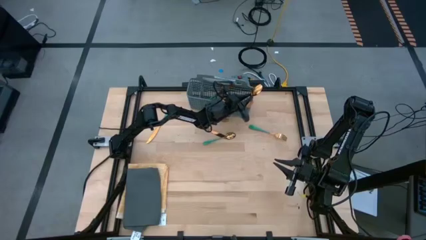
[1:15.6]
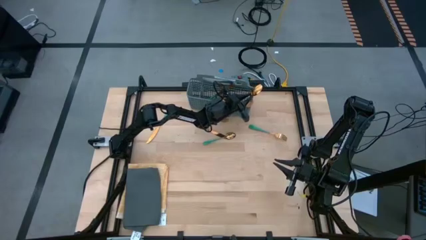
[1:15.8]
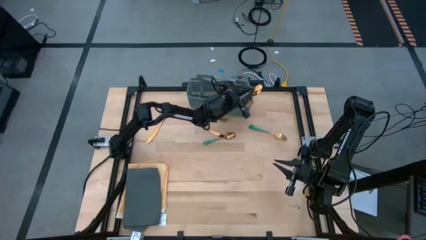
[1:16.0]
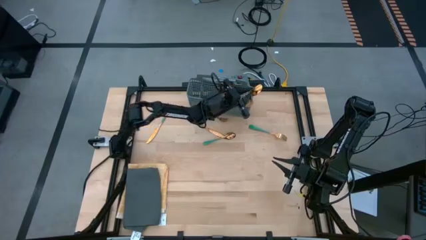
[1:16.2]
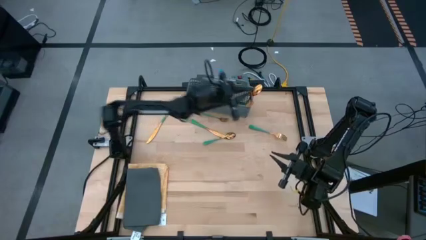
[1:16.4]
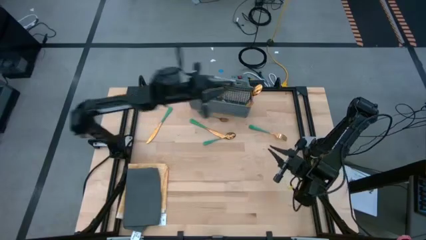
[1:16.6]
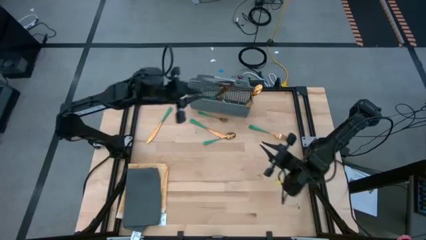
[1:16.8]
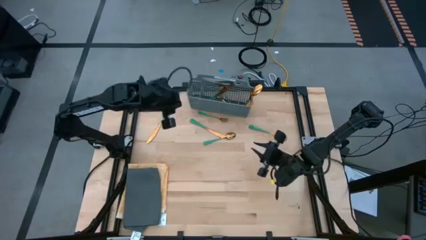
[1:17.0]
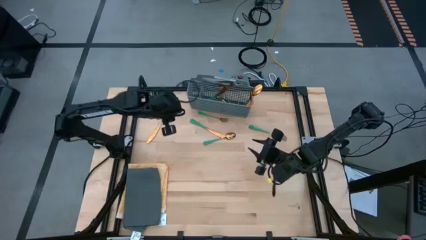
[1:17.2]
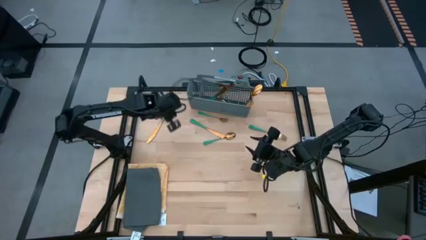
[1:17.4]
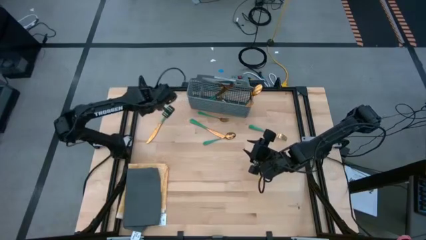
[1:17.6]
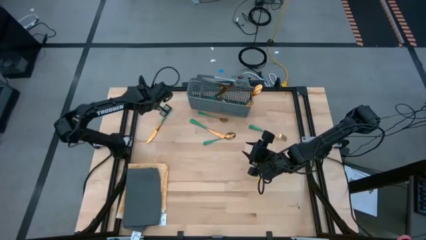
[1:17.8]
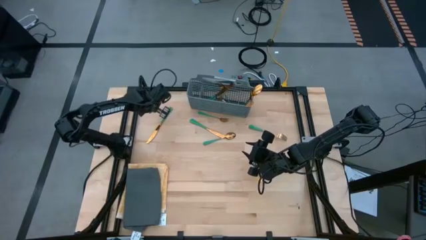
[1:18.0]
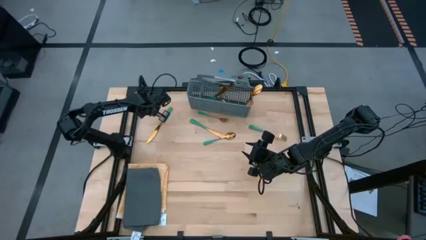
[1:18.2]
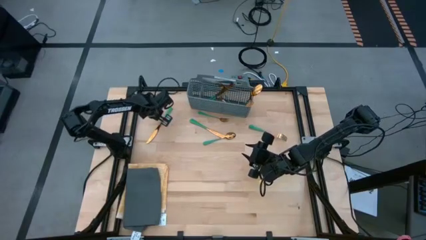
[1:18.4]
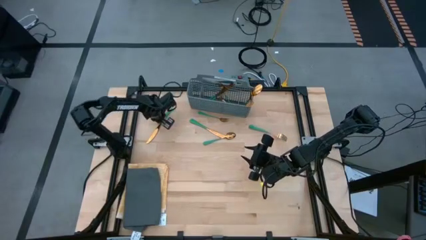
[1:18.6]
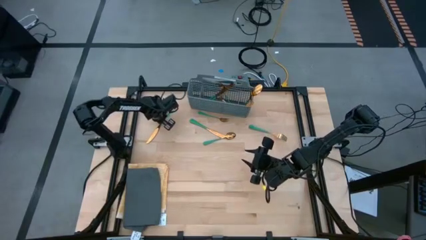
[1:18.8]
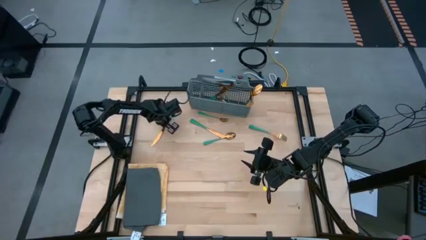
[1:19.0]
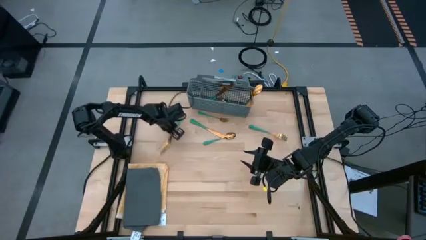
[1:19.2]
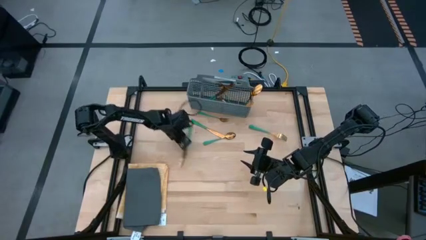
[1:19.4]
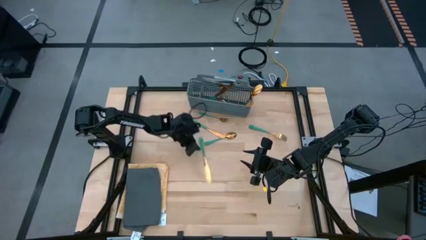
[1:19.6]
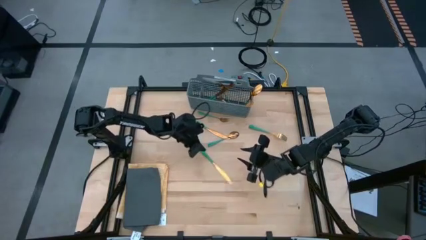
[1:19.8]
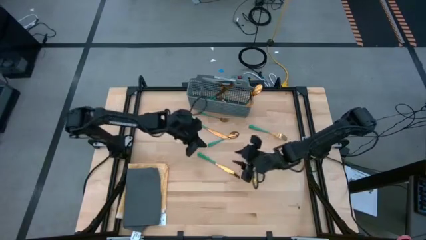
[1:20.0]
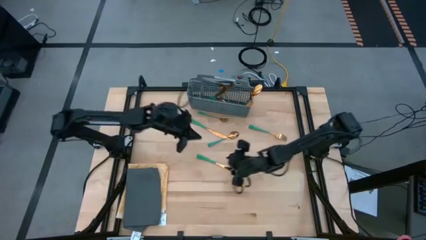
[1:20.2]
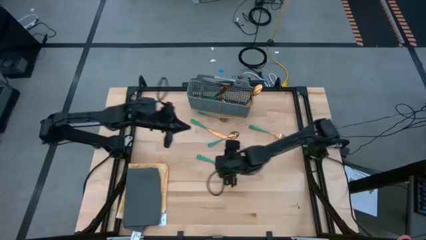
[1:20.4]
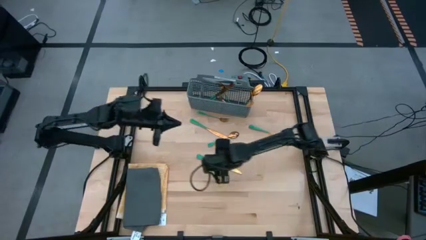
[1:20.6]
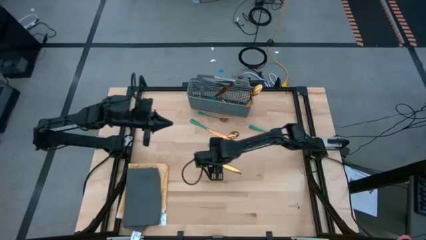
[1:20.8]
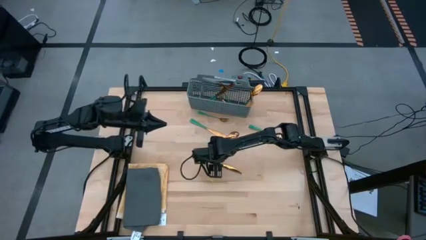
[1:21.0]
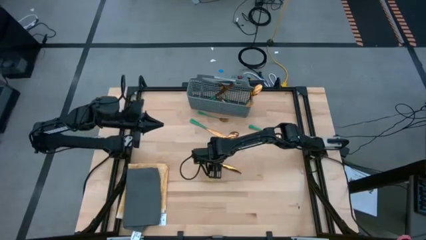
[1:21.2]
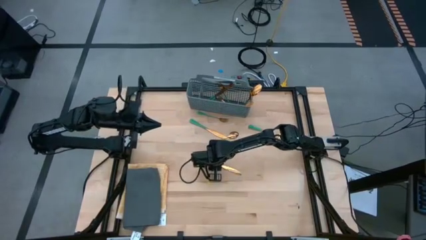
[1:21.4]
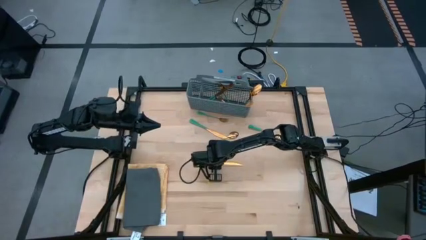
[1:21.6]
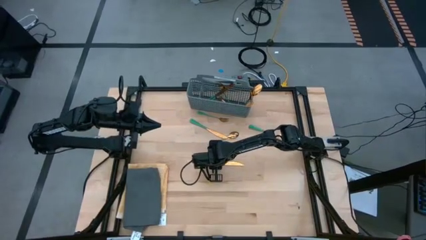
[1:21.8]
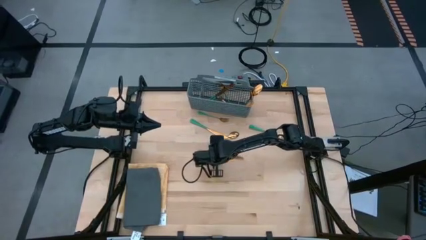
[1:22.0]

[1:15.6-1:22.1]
Task: Sort silverware
Put the green knife into the dishwasher utensil holder

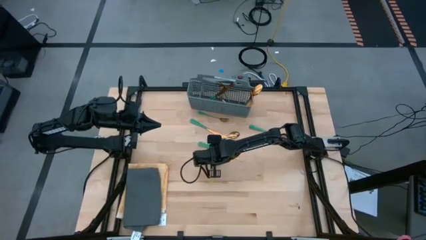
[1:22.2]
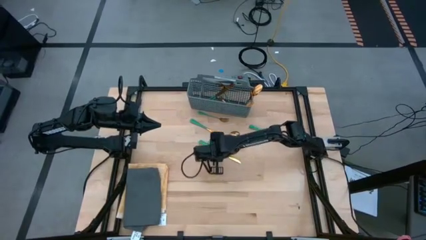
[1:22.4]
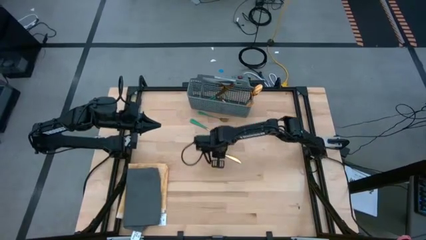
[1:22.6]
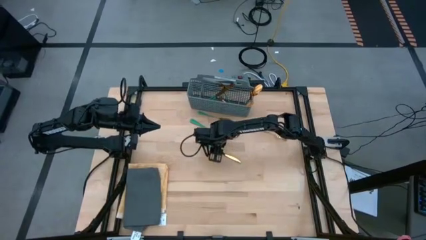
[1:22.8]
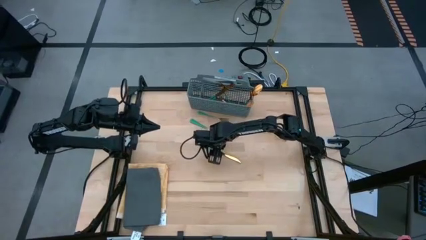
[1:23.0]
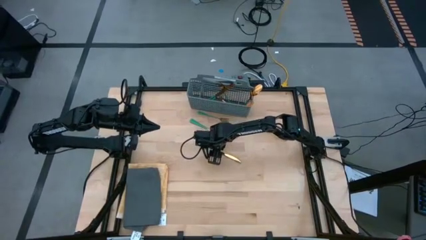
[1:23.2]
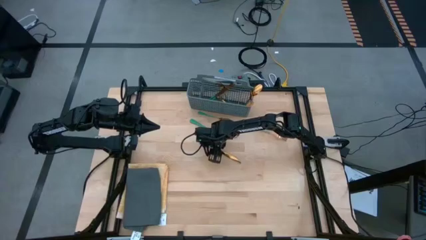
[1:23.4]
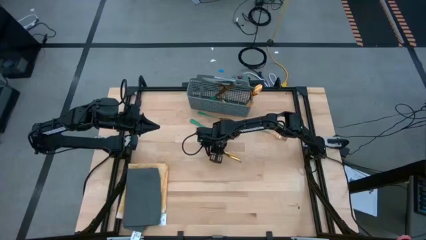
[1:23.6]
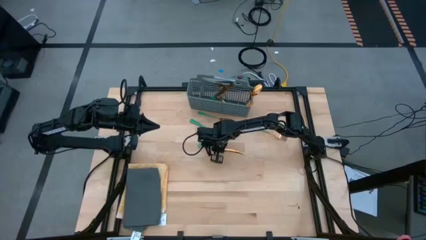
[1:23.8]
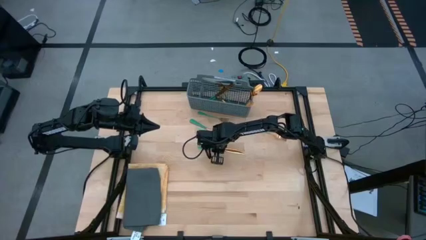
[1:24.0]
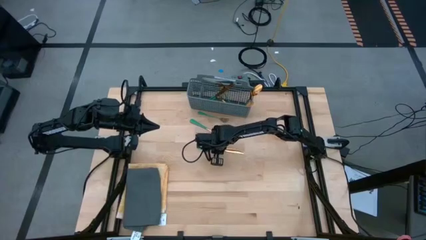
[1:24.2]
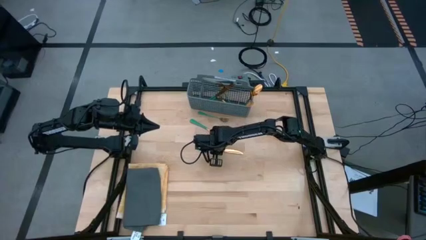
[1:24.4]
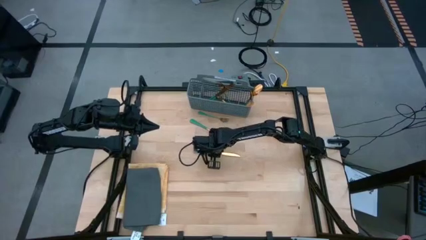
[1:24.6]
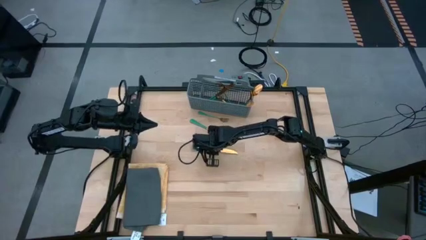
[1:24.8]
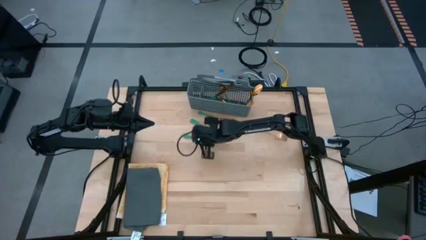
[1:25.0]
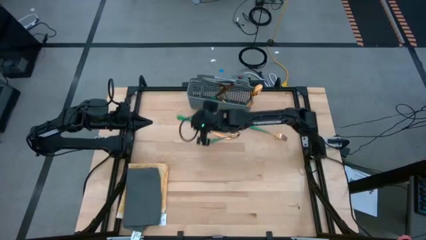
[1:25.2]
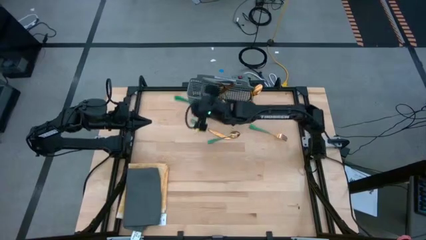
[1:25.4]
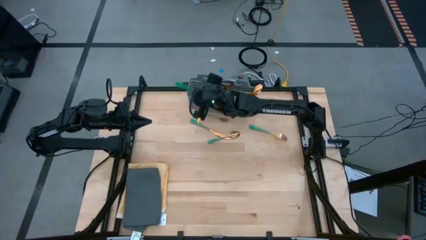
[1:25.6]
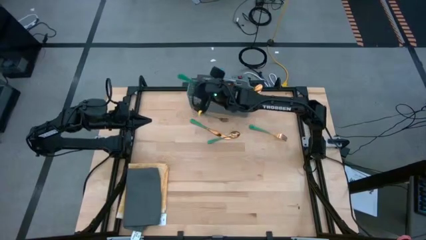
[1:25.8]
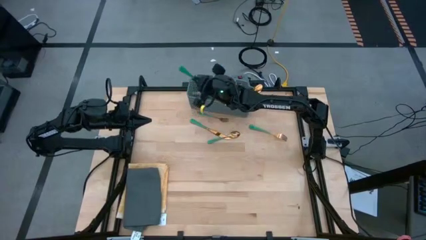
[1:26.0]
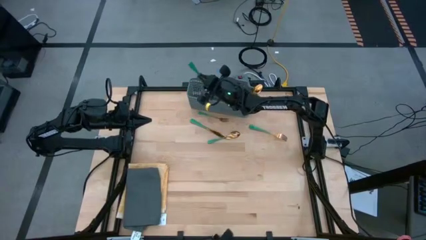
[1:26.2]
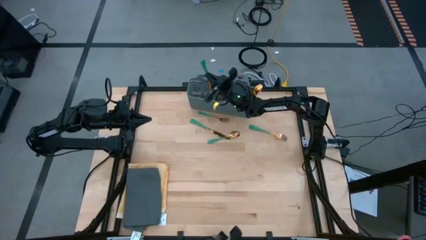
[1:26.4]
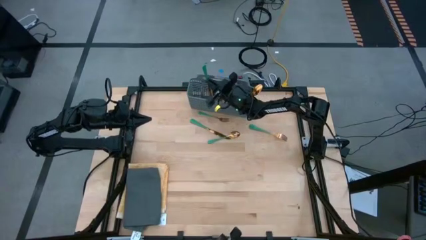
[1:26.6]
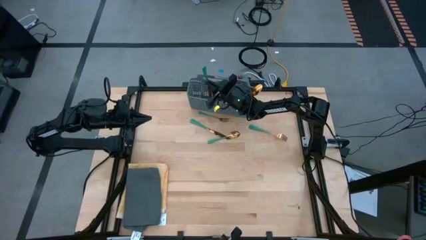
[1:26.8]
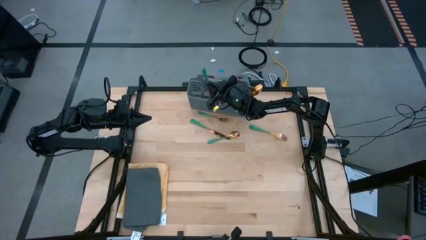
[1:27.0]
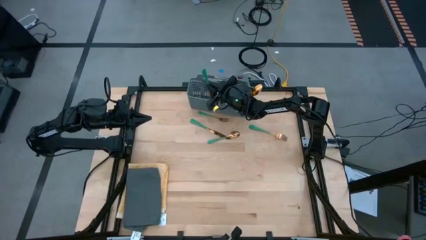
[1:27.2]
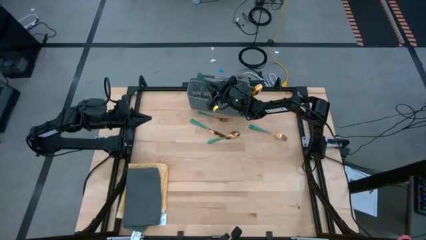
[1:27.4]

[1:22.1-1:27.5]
Put the green knife into the dishwasher utensil holder

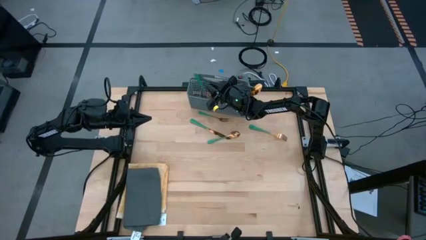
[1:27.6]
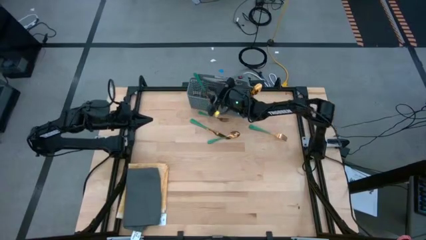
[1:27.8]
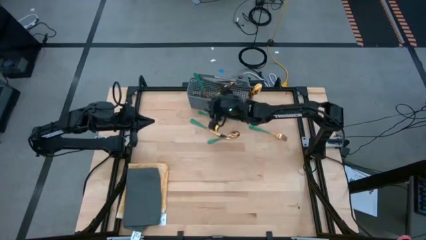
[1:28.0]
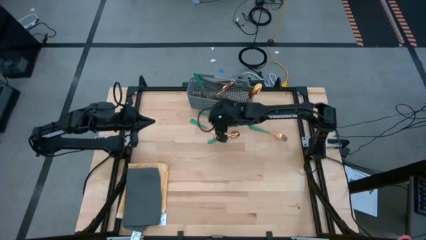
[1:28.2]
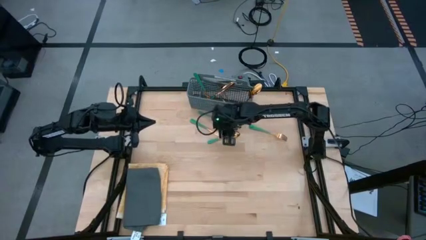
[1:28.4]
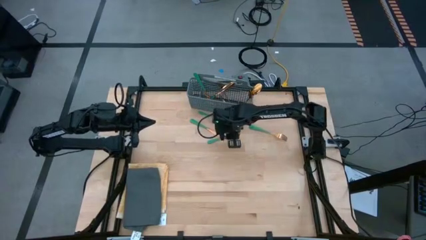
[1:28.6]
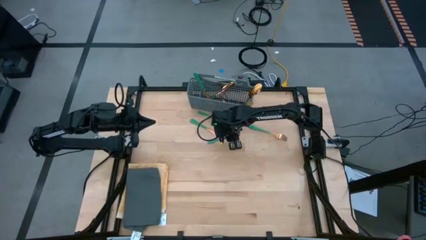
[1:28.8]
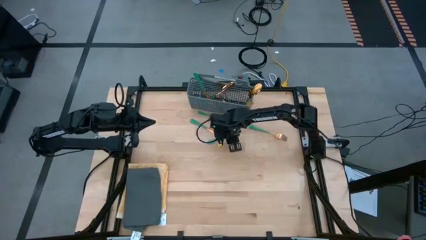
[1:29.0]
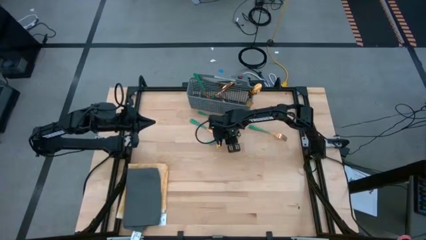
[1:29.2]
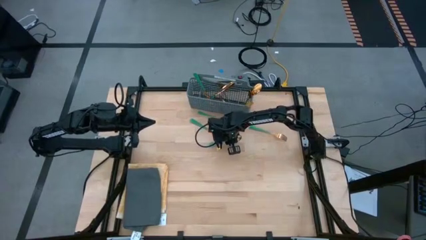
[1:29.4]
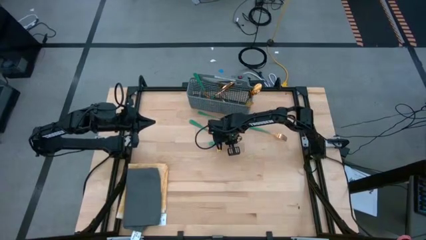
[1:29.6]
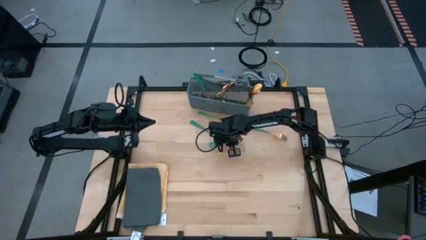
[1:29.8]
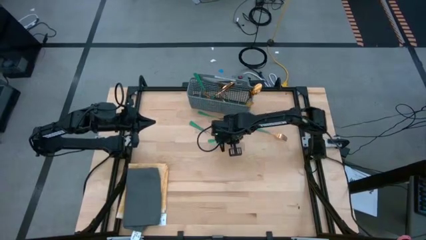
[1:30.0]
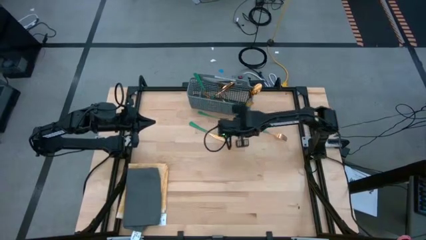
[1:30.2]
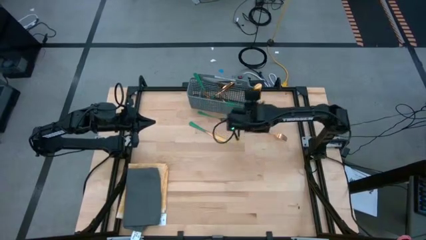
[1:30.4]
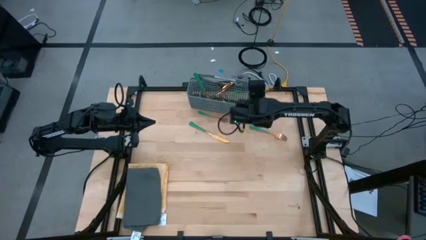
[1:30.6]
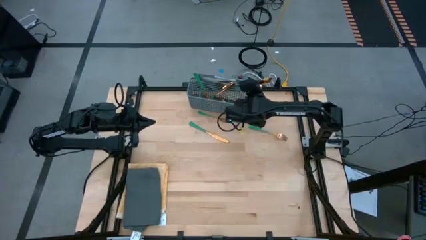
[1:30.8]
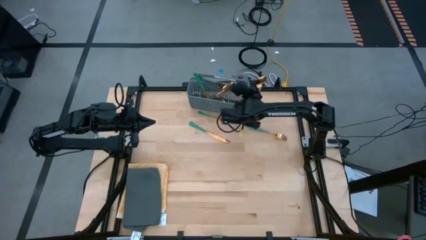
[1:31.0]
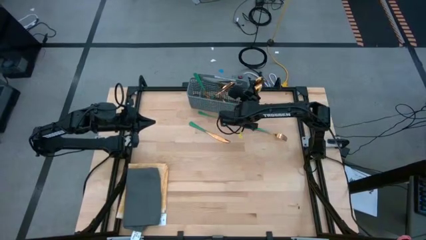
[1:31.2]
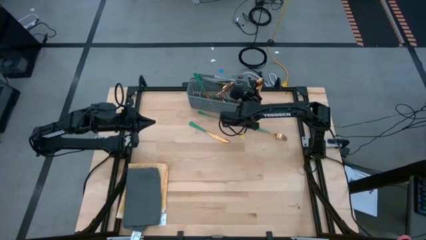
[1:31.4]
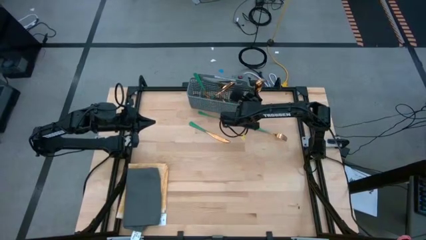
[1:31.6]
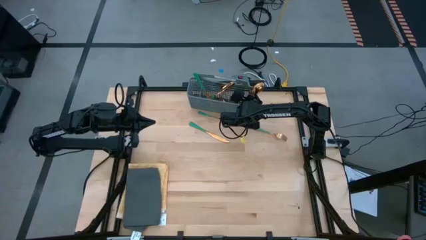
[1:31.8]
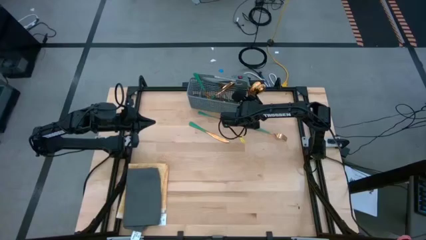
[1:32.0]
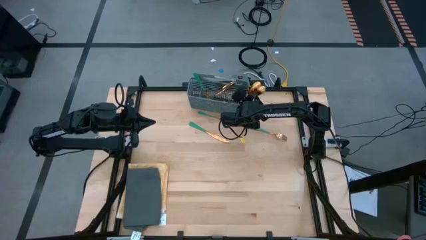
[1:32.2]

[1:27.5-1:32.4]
Put the green spoon into the dishwasher utensil holder

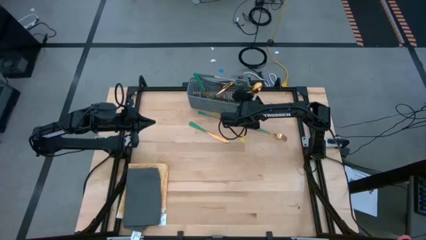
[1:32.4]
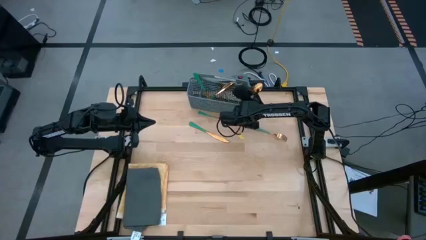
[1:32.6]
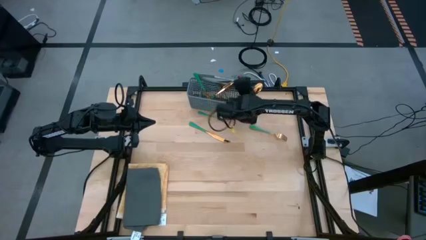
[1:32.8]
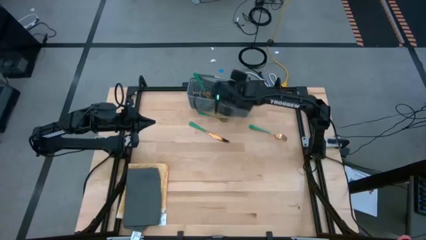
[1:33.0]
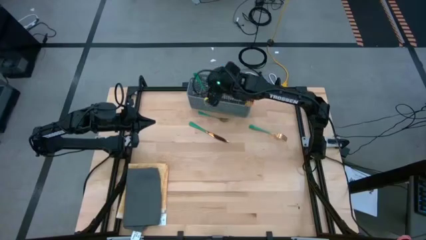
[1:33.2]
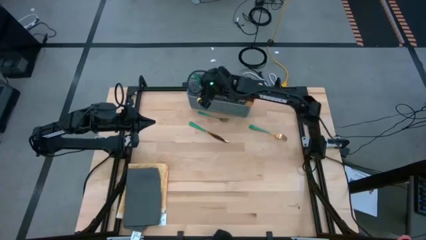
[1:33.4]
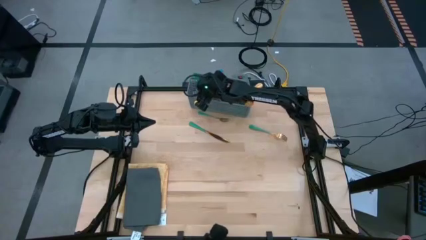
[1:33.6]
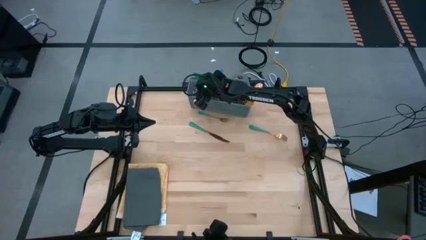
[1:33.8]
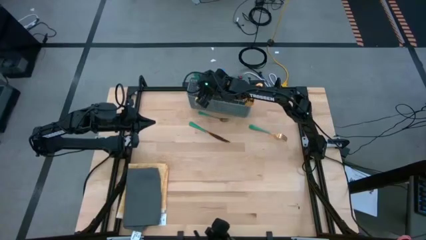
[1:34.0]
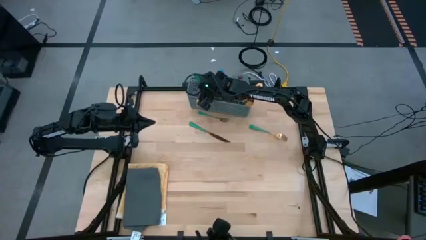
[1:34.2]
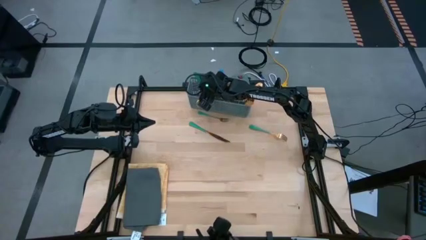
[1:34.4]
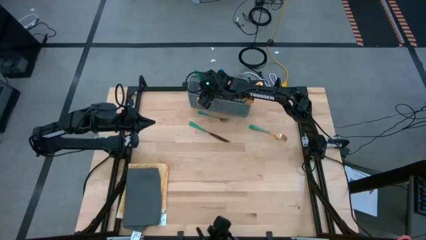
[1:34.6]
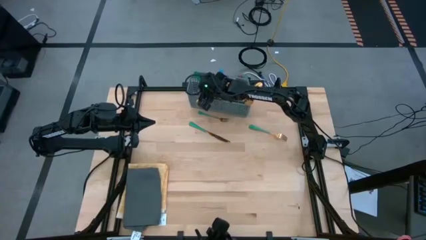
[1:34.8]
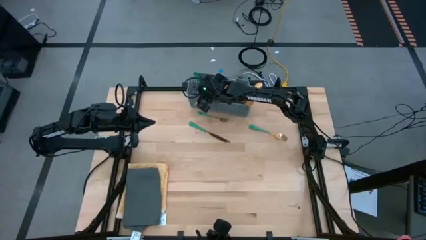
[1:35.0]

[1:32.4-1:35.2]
Remove the green knife from the dishwasher utensil holder
